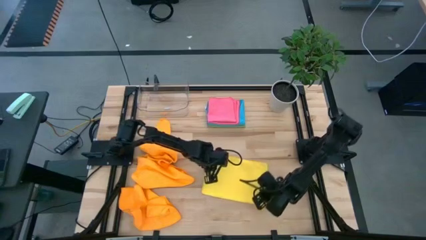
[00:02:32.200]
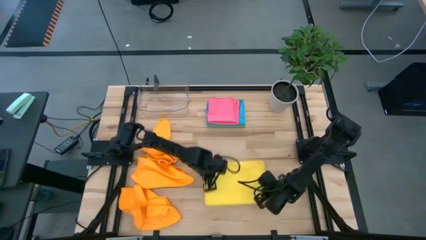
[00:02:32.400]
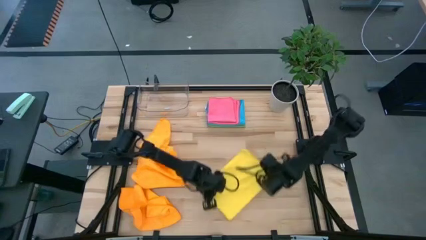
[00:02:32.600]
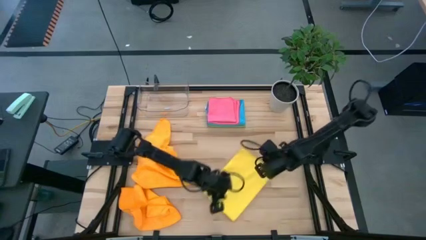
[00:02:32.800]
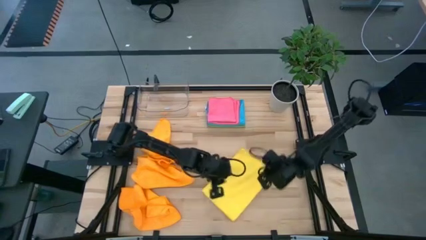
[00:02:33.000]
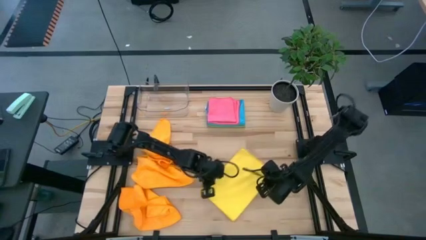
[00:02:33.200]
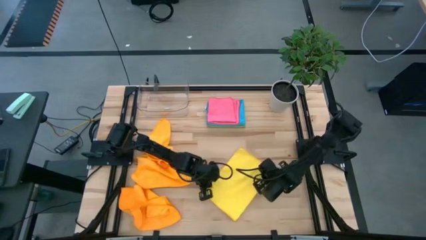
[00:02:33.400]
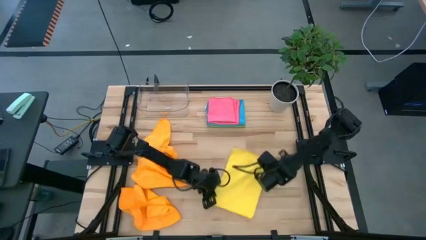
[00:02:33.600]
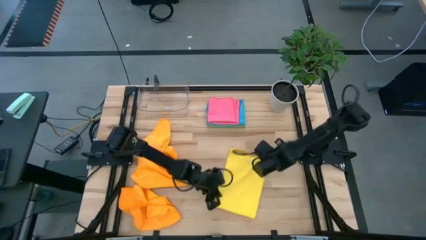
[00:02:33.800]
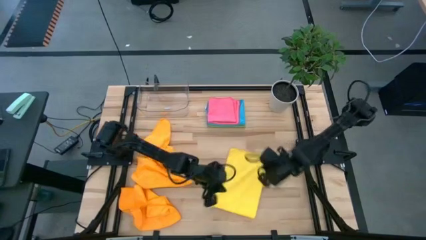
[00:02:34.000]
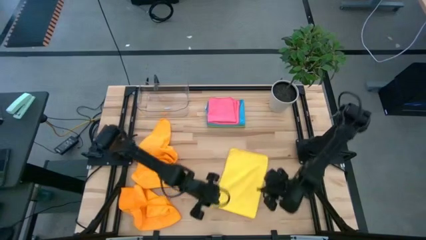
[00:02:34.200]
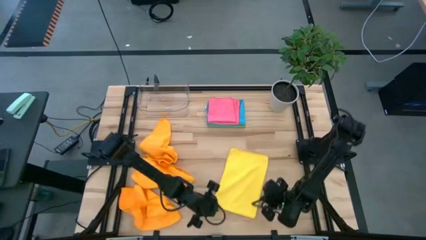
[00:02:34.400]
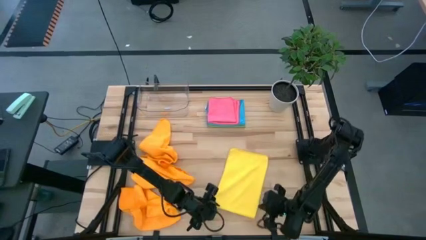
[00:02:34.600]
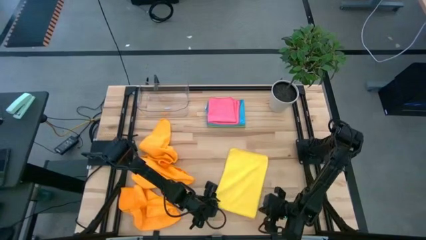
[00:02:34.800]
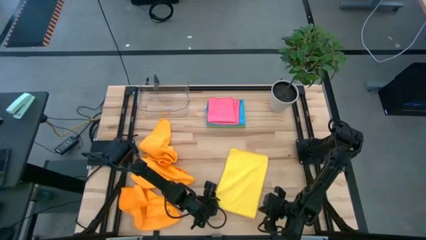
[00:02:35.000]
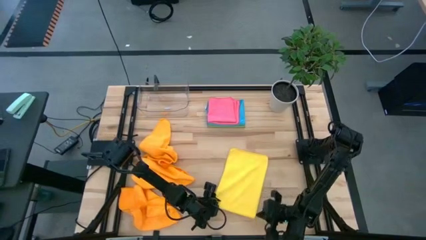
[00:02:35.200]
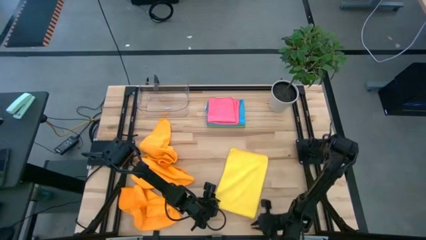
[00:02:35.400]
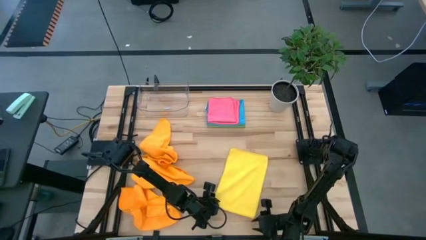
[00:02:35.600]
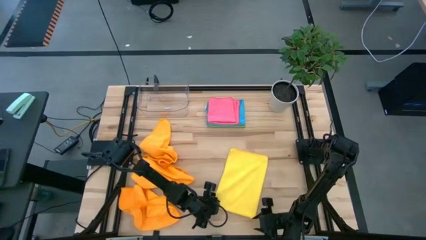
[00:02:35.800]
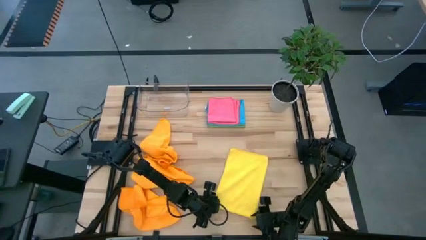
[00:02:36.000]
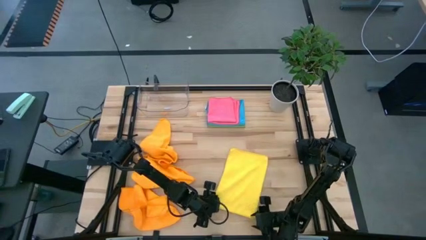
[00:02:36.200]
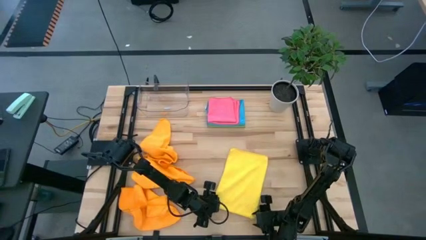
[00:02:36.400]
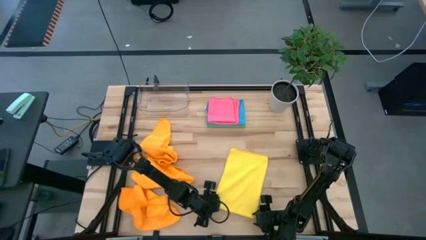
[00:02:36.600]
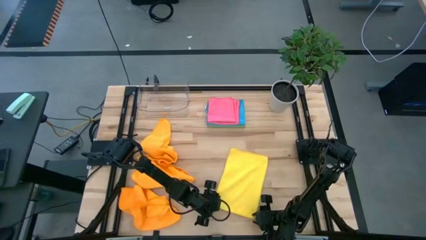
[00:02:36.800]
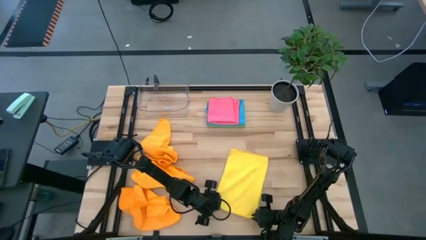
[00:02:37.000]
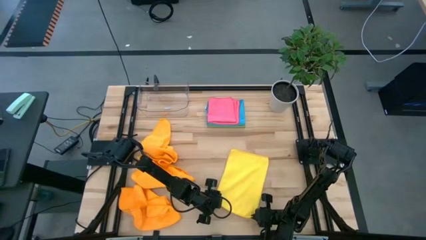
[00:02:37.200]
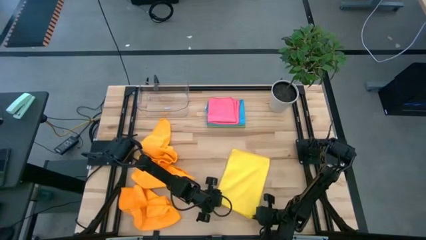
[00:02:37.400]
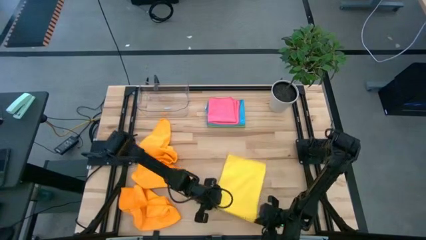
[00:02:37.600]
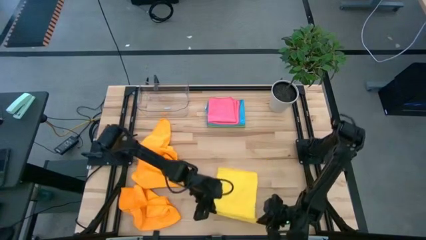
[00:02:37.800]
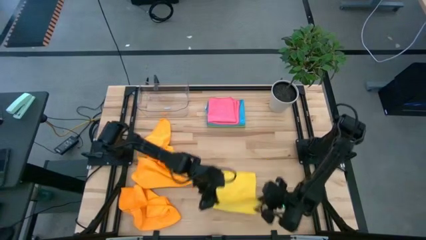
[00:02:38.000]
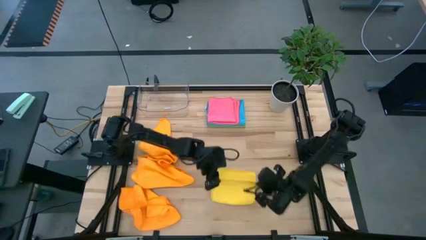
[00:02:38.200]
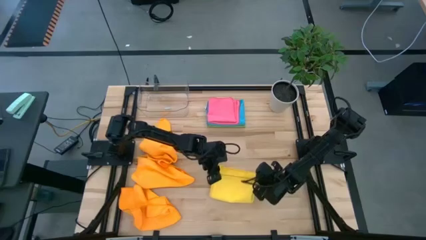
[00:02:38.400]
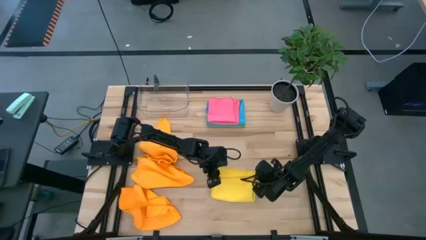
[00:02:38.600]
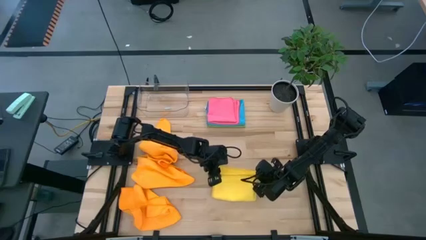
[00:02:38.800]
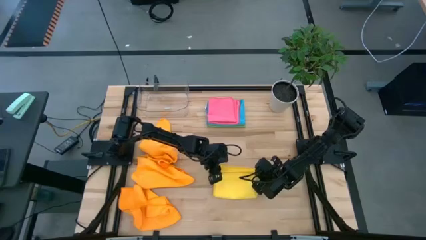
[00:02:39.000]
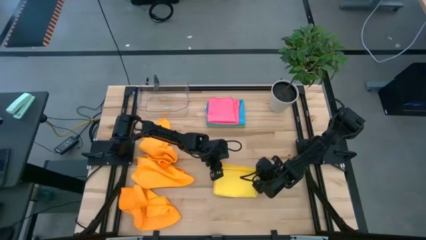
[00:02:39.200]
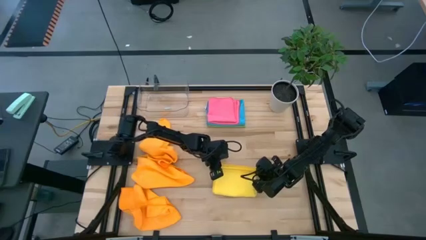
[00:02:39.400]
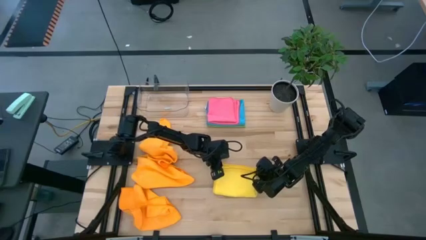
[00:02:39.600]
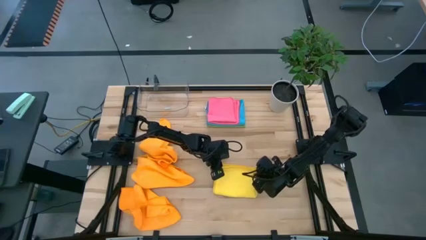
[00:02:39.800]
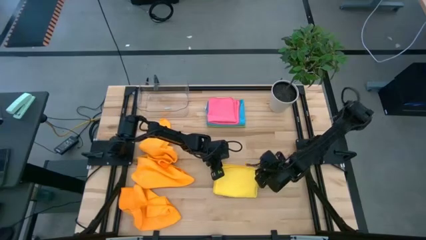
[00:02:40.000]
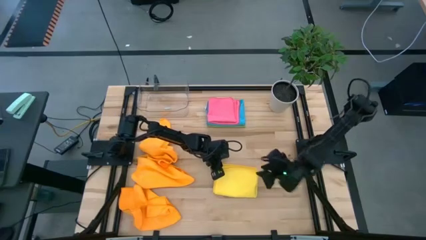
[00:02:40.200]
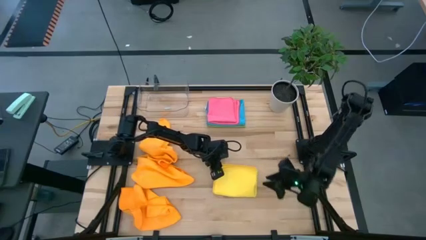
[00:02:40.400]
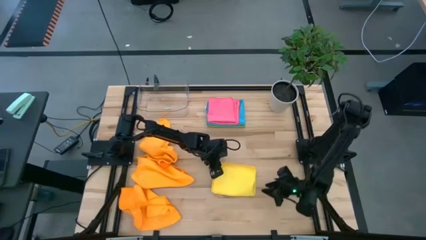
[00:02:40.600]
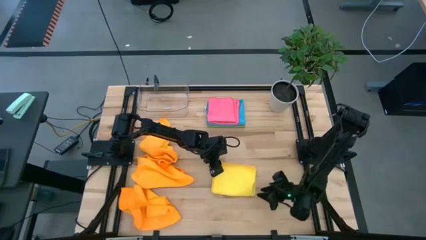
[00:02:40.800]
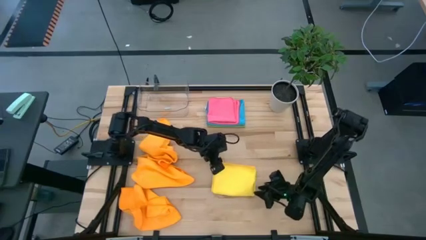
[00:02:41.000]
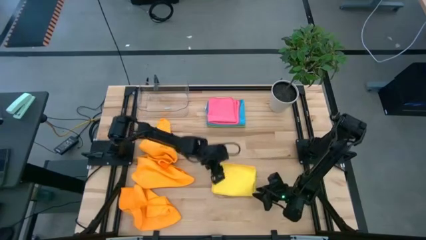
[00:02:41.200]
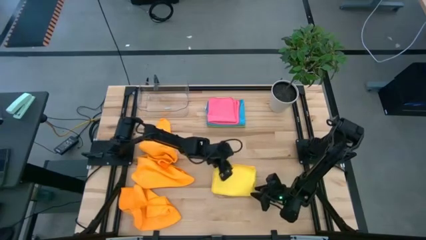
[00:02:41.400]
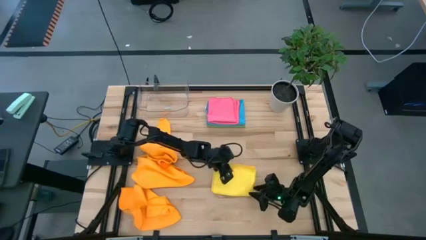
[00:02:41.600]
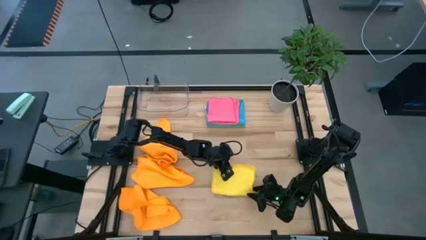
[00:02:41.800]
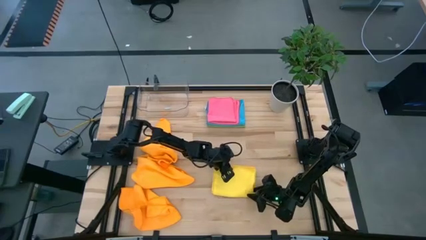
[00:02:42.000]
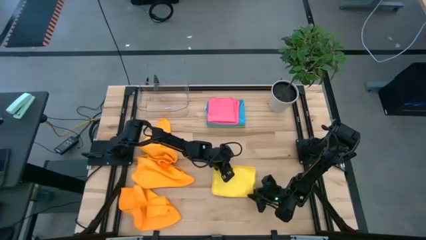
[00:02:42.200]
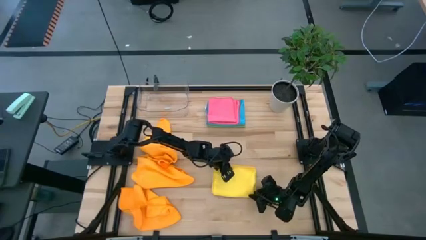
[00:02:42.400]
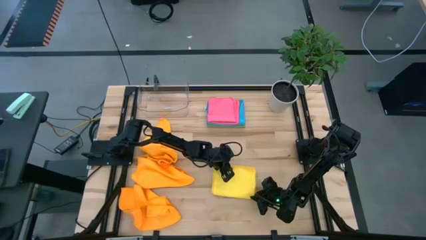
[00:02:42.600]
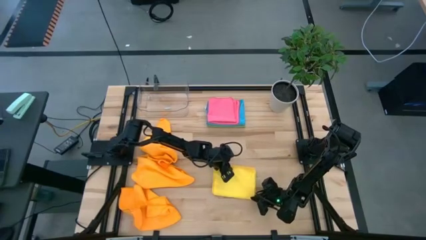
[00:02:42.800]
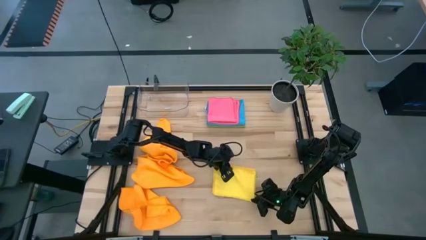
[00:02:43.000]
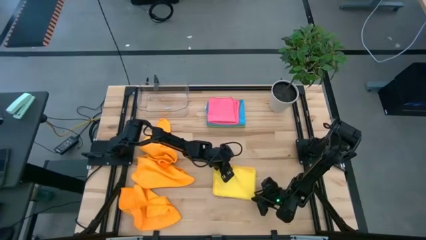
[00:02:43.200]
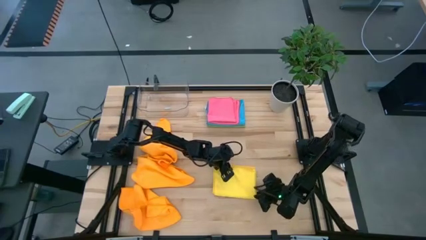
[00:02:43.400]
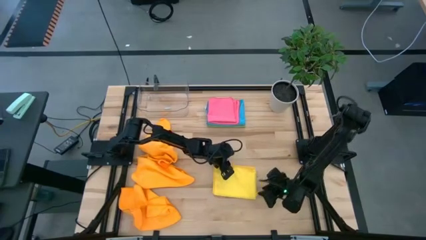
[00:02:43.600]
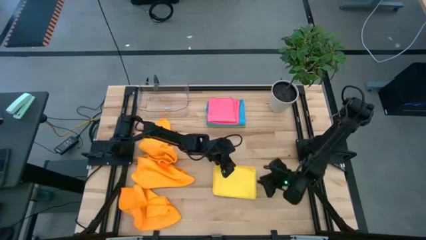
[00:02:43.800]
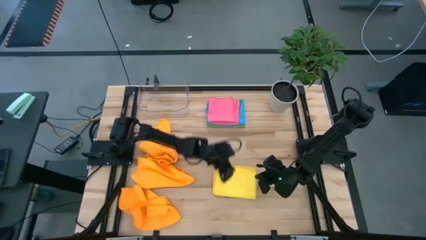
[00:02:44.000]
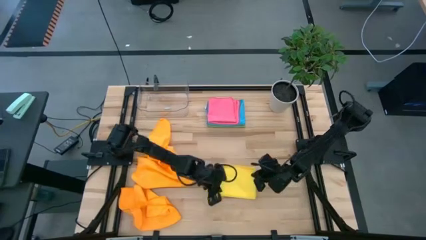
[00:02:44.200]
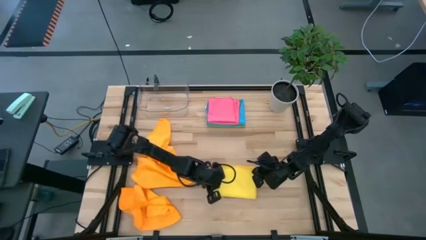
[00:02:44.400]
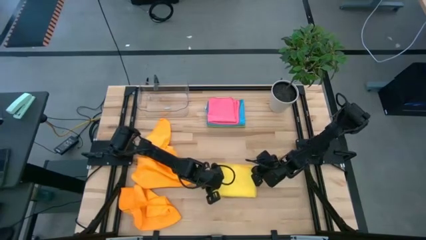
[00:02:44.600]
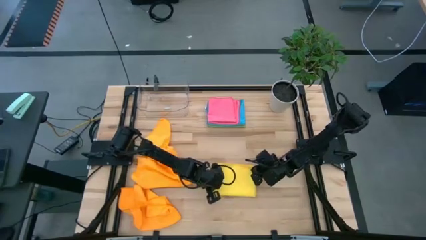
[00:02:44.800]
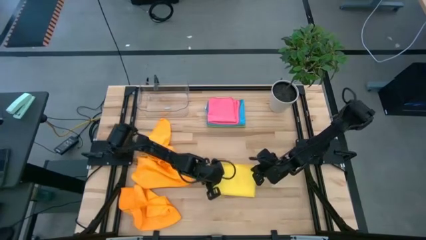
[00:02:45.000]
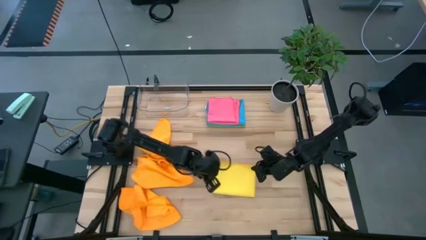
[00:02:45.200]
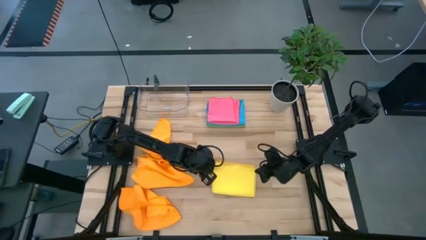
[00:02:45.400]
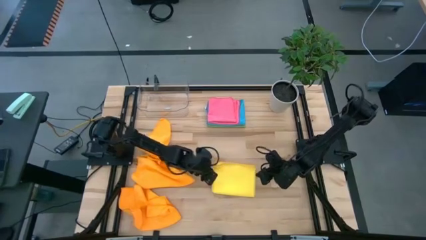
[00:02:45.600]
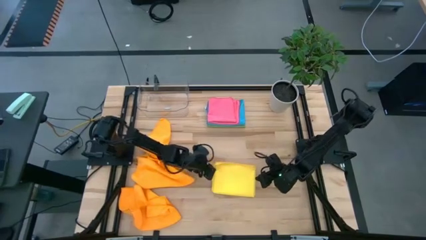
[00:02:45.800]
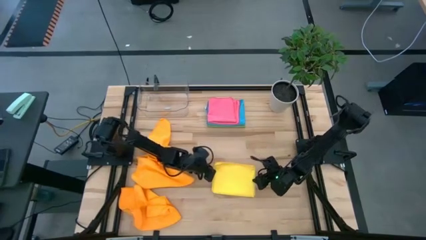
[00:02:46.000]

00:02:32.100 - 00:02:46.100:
Task: Fold microfiber towels
Fold the yellow towel

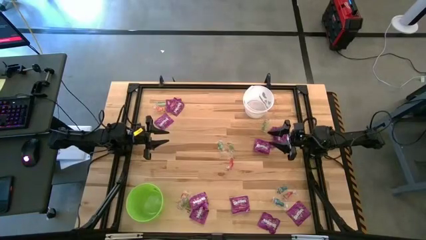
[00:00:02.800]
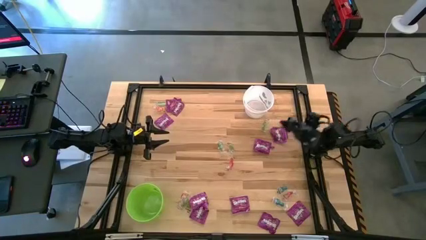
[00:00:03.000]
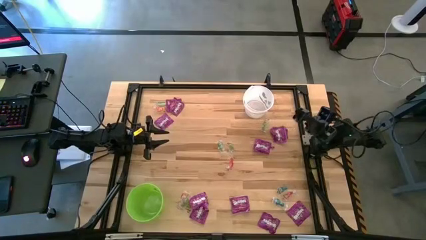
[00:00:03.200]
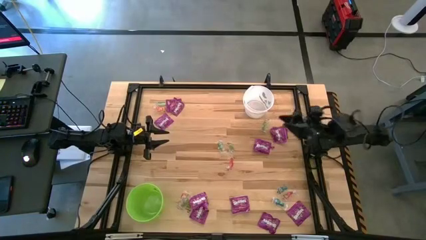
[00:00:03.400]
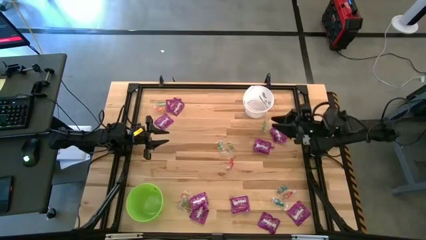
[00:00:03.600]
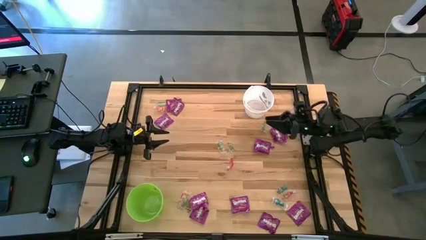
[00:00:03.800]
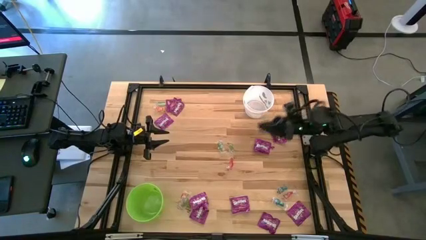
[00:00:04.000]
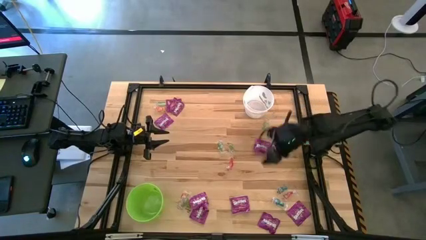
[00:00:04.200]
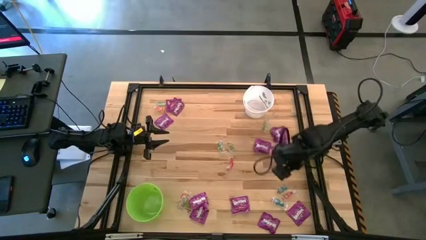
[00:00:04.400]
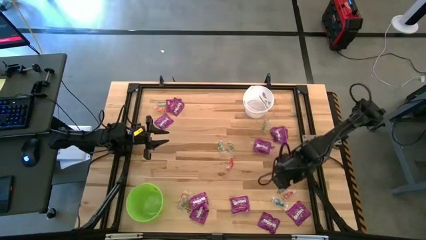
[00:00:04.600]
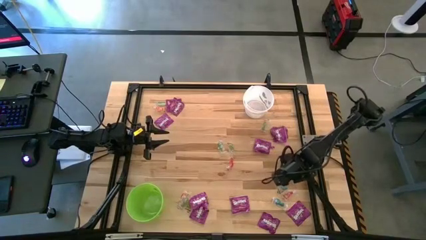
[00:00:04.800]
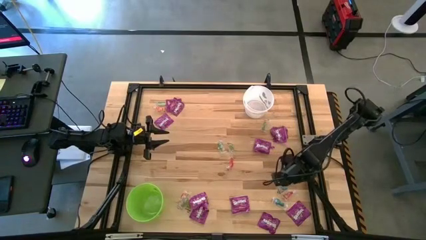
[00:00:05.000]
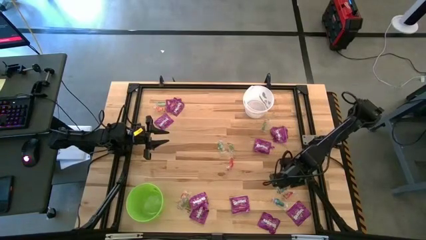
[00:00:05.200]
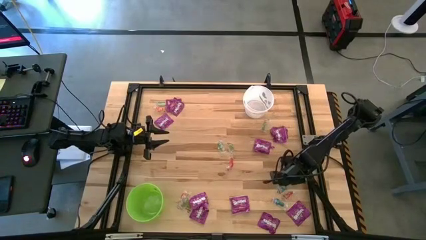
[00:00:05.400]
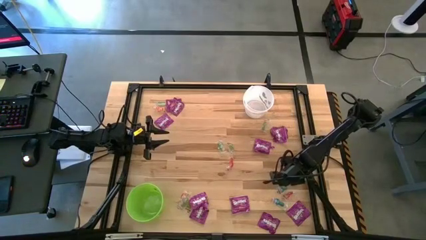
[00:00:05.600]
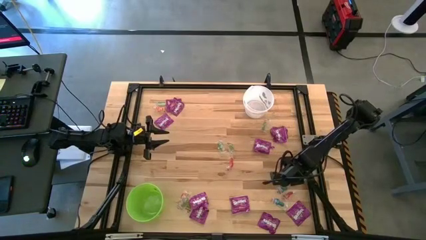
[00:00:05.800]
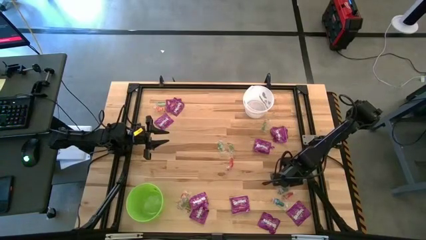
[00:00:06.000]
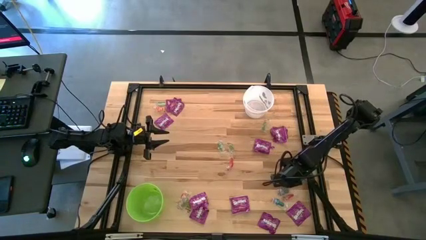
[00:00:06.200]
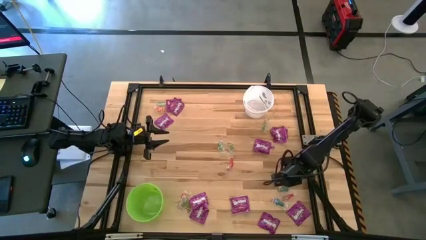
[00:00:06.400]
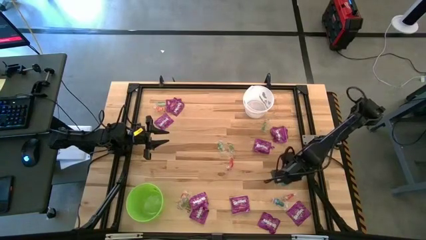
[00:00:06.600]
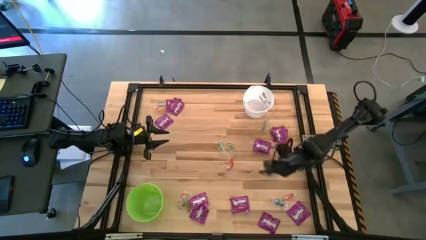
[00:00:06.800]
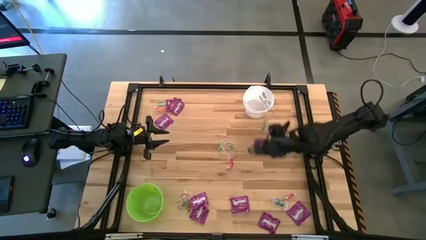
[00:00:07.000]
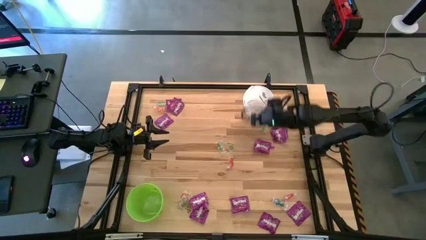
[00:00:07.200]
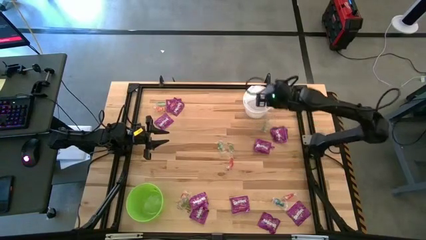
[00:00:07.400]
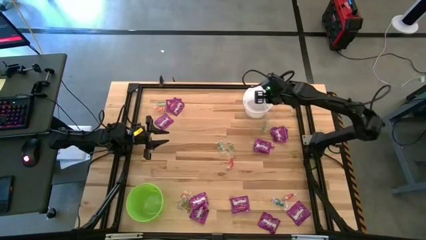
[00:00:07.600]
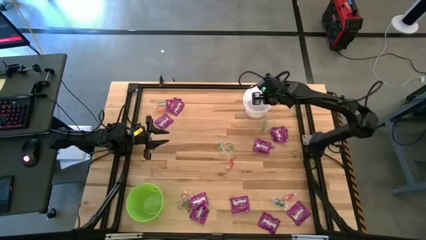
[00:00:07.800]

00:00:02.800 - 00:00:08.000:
Task: Sort candy by brand, put in halloween buckets
Put the blue gummy into the white bucket
